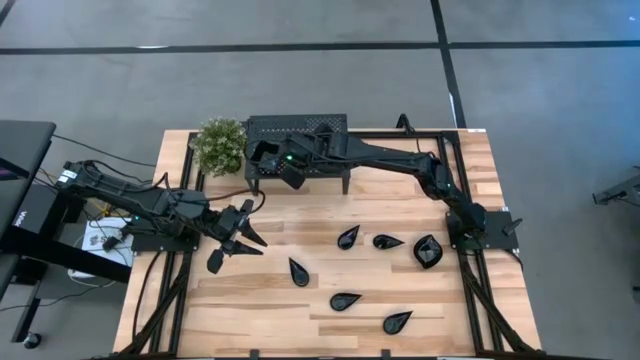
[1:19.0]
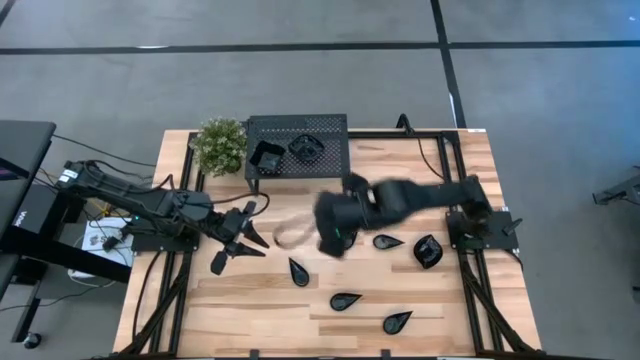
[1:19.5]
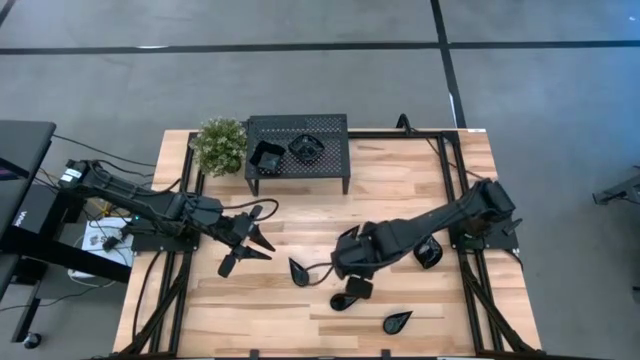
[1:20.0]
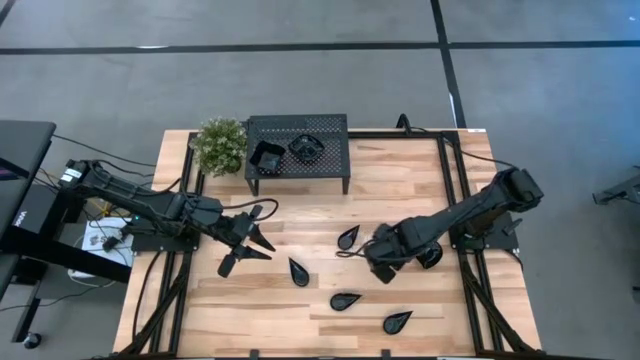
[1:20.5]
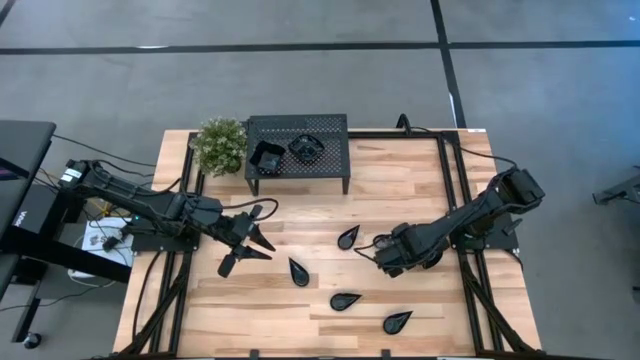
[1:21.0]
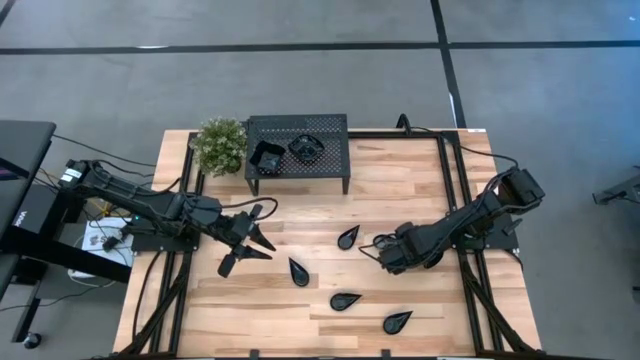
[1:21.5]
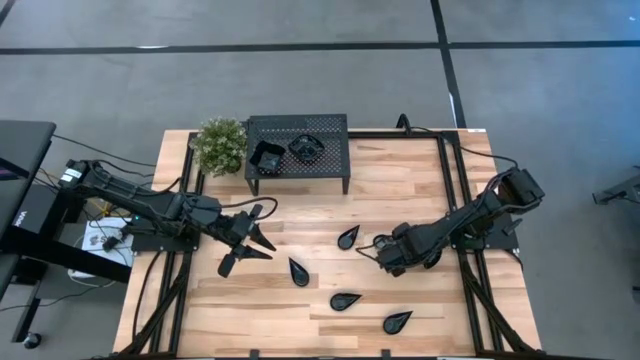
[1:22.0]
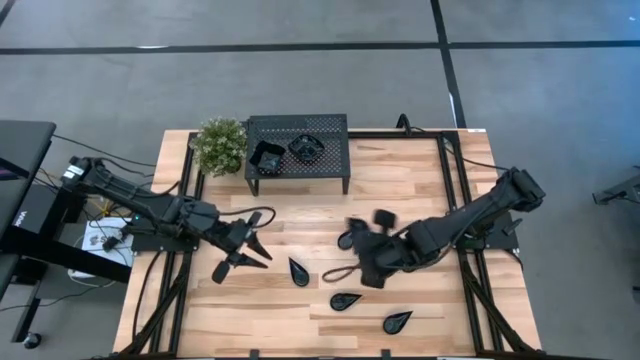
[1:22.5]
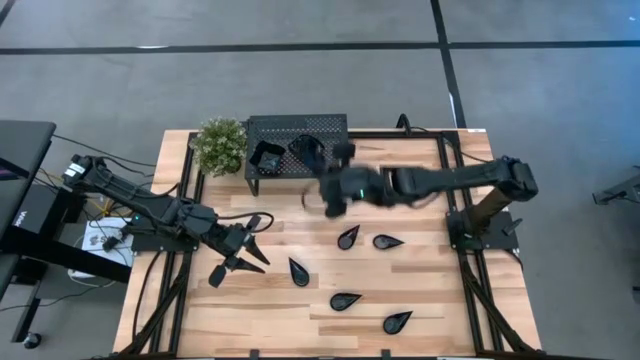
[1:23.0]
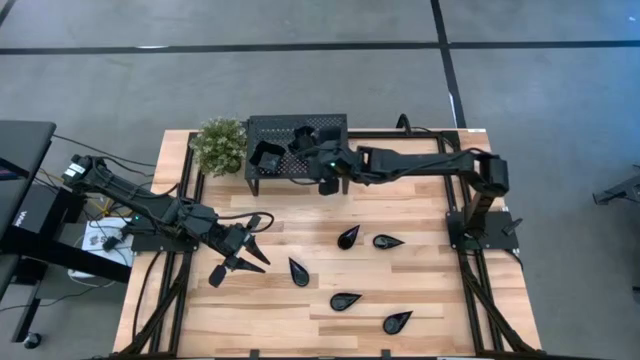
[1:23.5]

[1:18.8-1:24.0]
Task: Pick & Place Mini shaped plates
Stack the leaf shaped plate on top of the leaf shaped plate on the shelf

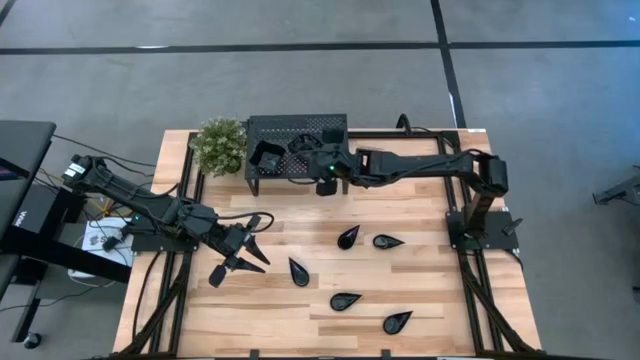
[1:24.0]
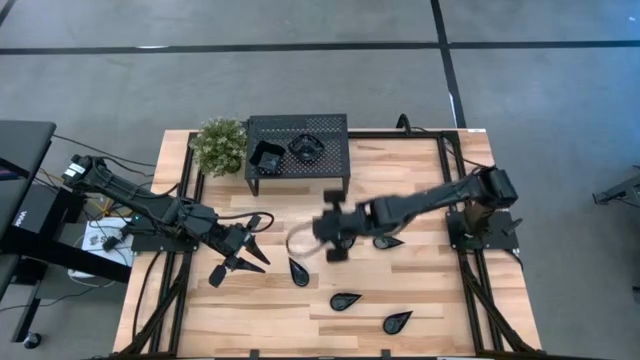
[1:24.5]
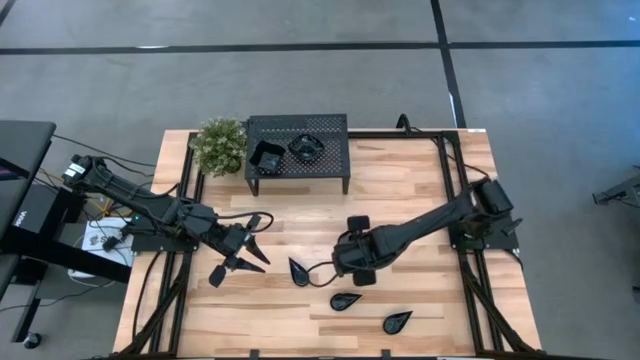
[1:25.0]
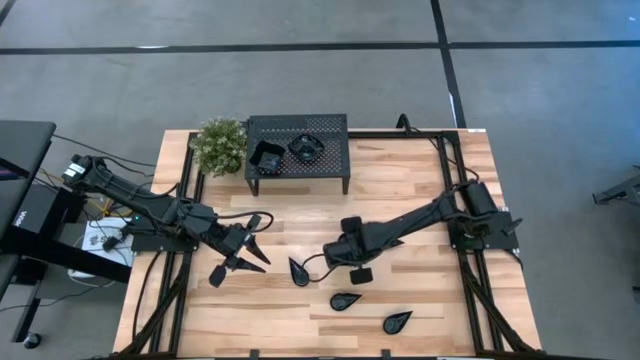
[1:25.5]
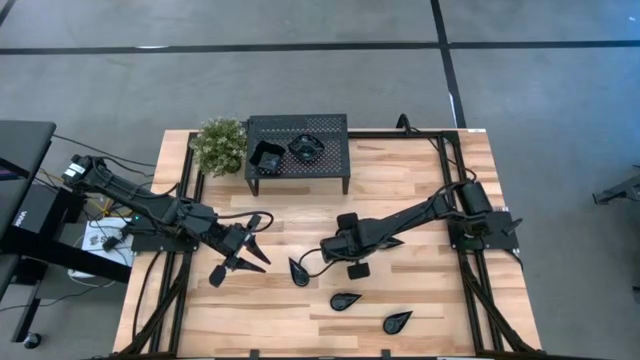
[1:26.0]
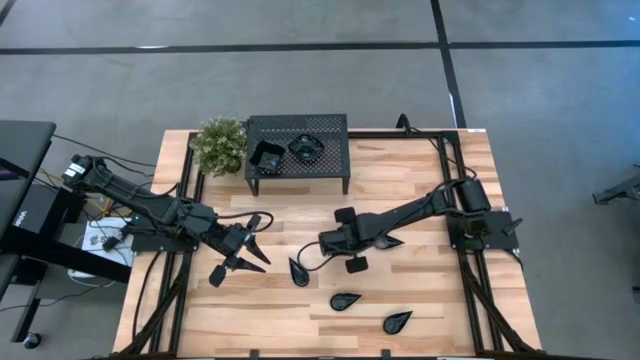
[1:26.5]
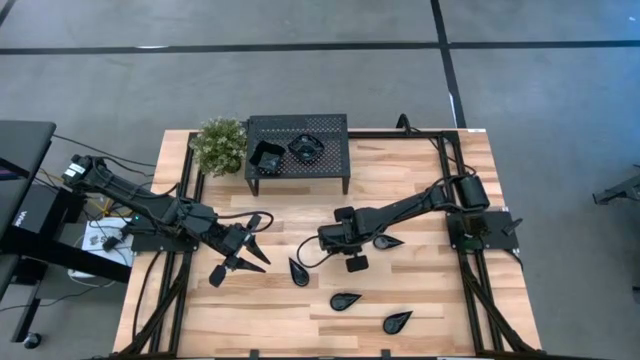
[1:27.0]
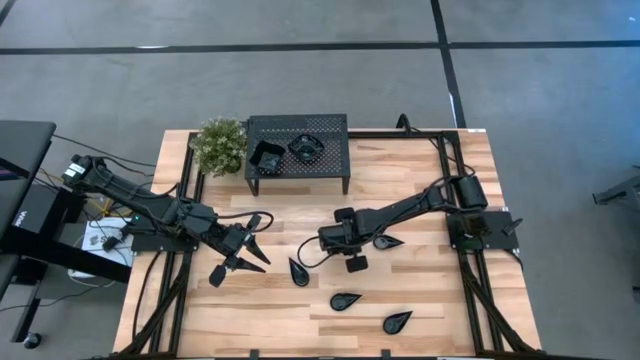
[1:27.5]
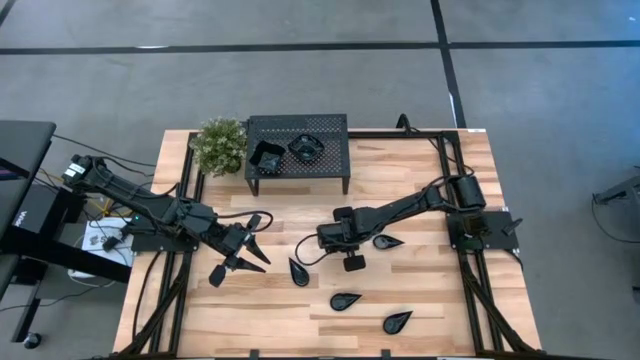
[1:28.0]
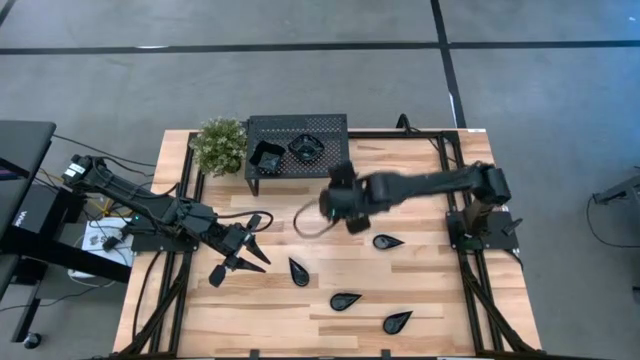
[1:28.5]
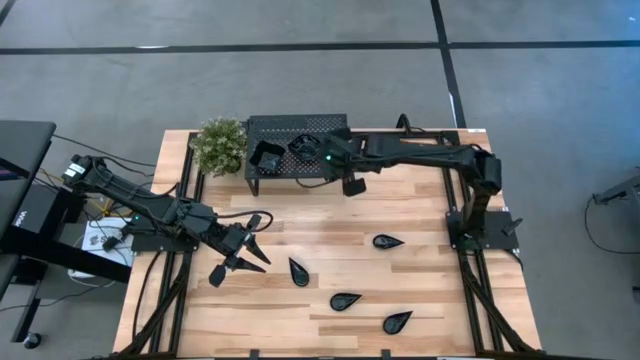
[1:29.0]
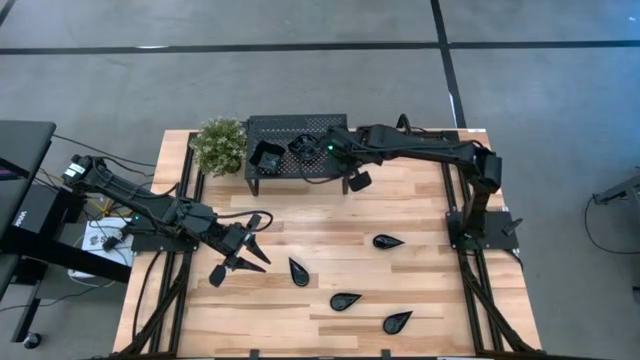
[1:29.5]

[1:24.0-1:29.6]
Put the drop shaped plate on the shelf

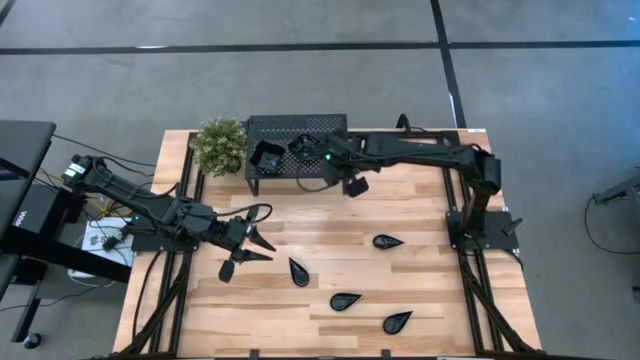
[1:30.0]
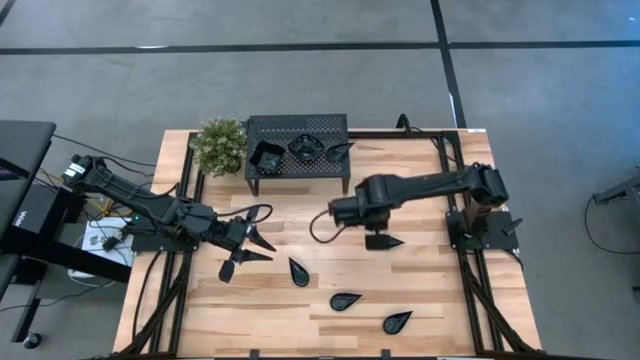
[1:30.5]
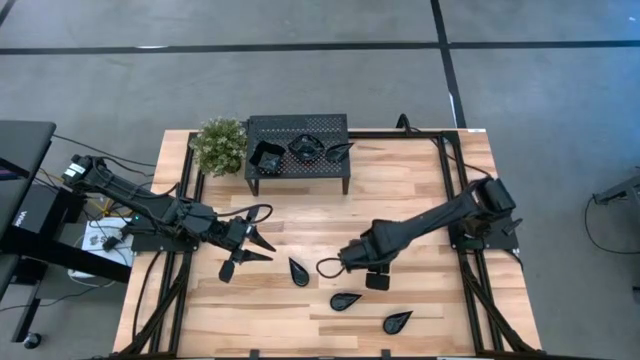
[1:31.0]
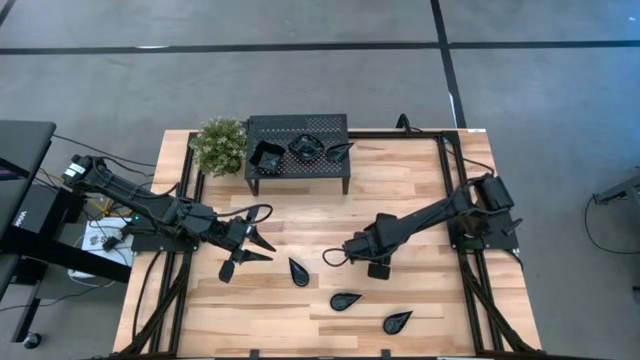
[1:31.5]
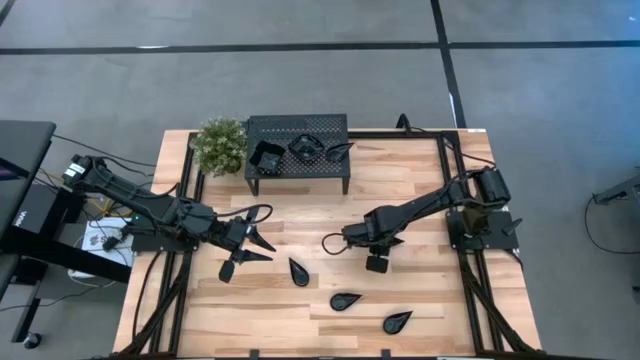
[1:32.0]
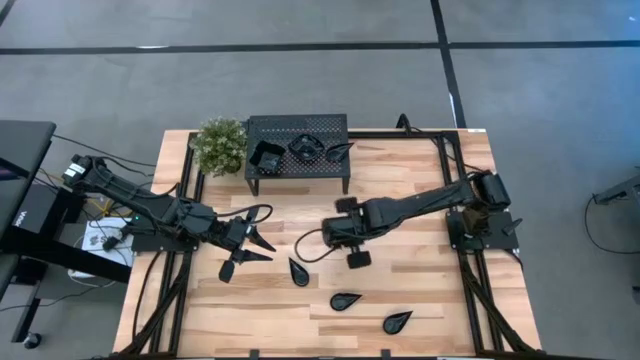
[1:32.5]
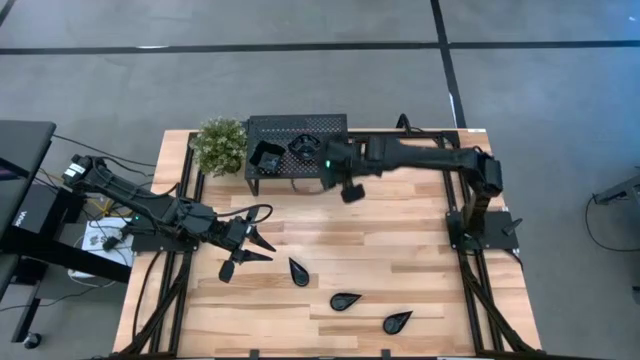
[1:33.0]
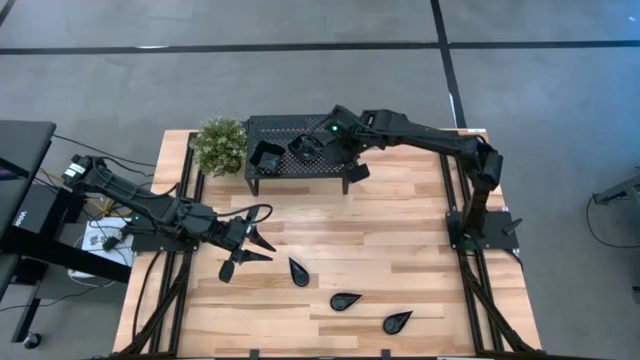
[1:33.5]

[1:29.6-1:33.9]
Stack the drop shaped plate on top of the drop shaped plate on the shelf

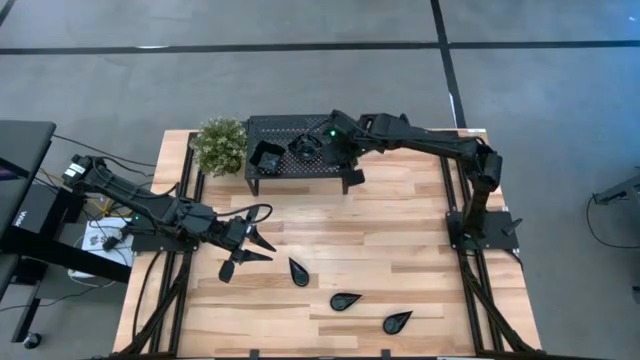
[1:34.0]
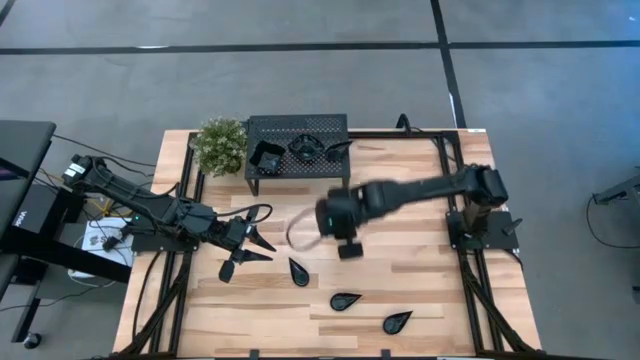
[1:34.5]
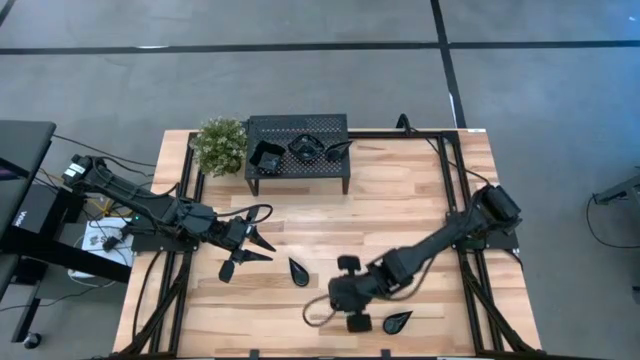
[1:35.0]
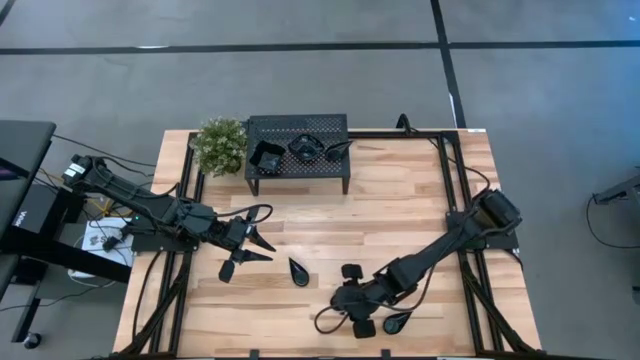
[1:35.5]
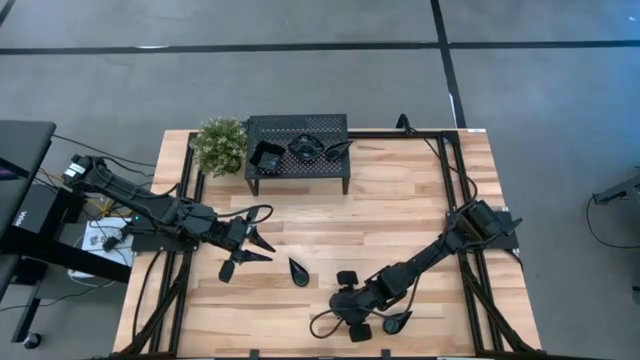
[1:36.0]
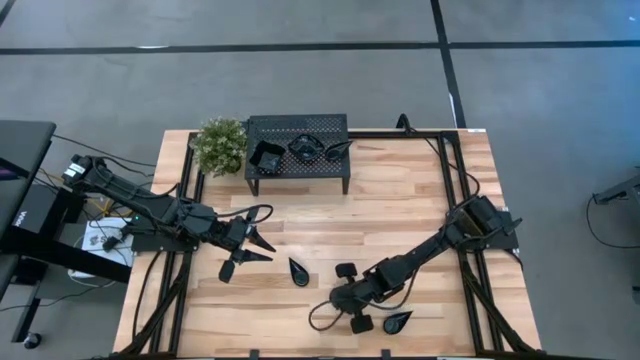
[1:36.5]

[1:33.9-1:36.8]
Stack the drop shaped plate on top of the drop shaped plate on the shelf

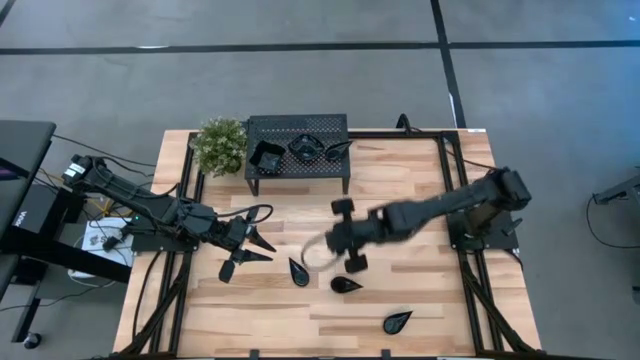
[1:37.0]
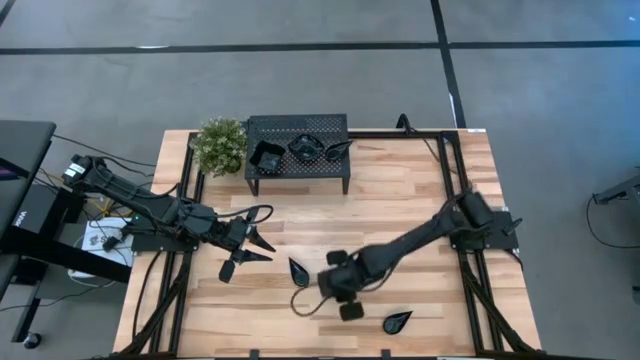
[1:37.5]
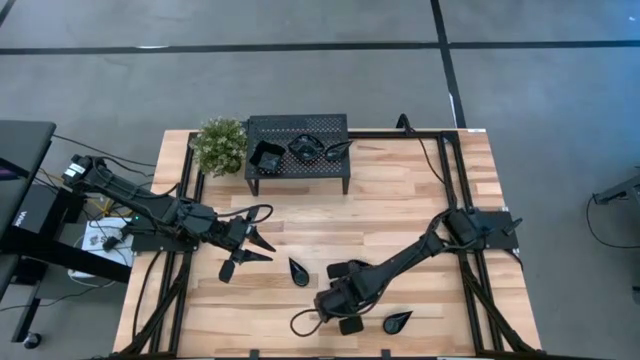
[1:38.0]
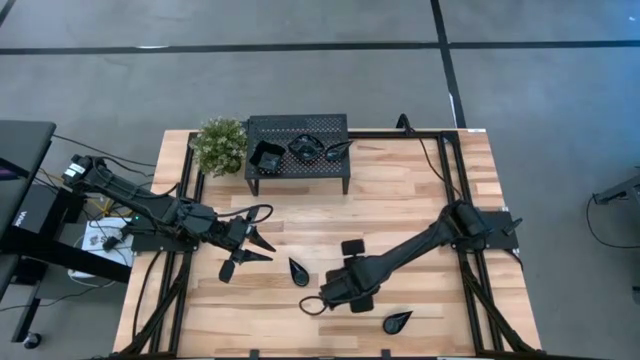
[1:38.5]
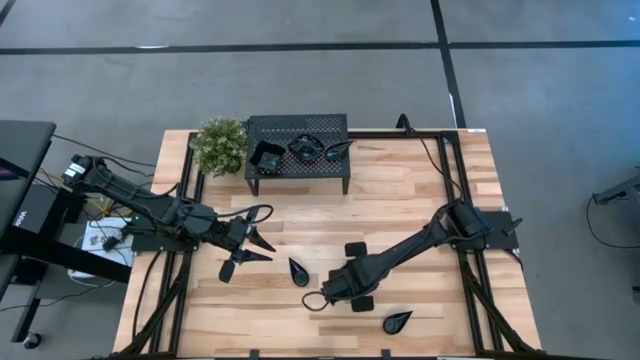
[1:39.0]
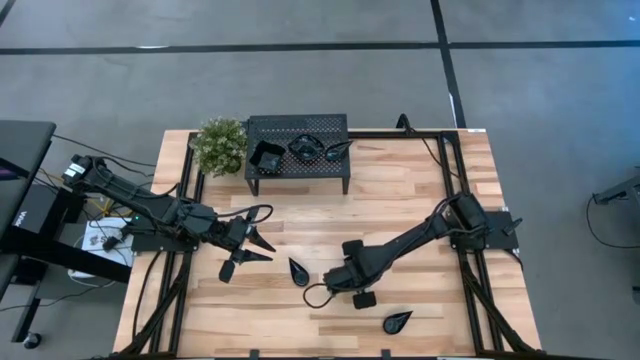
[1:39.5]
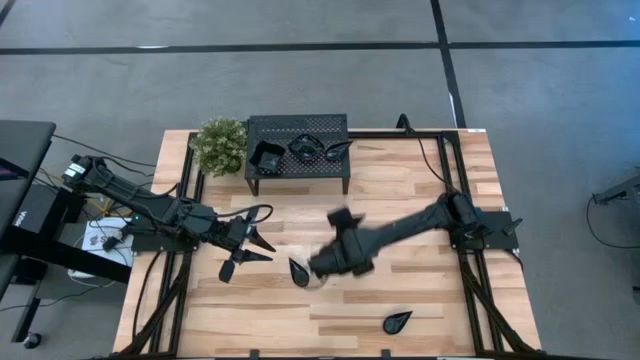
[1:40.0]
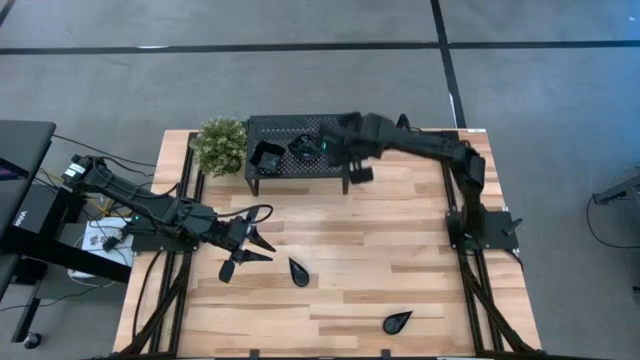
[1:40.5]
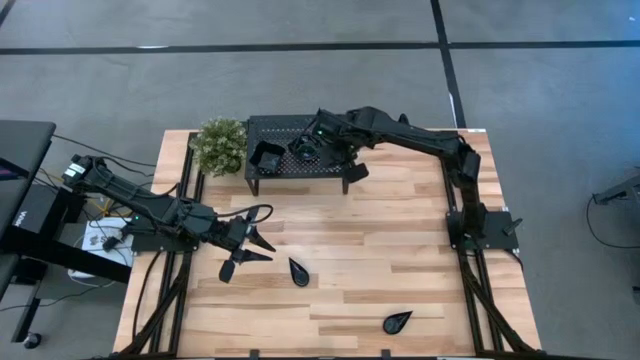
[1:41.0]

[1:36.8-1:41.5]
Stack the drop shaped plate on top of the drop shaped plate on the shelf

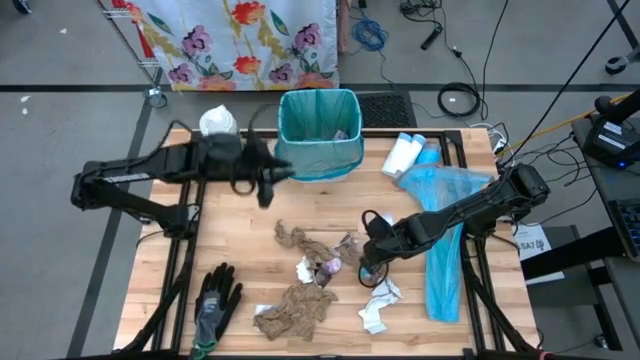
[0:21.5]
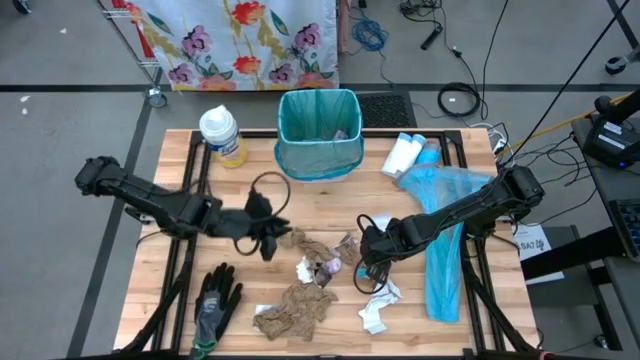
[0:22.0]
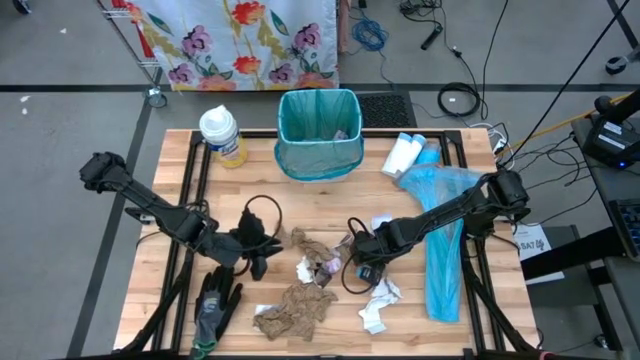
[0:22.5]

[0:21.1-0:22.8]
Task: place trash/remove bag and relplace
Put the brown napkin into the white trash bin
